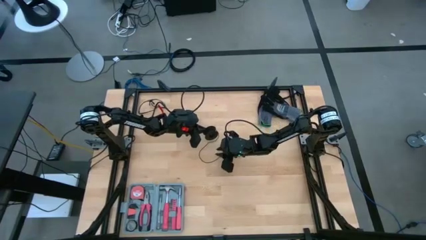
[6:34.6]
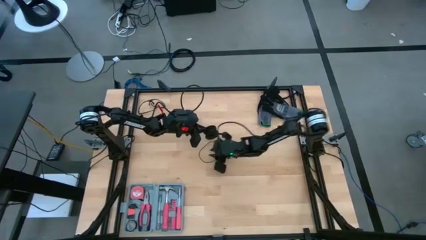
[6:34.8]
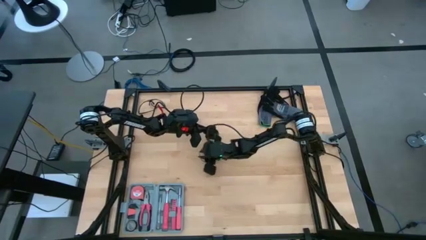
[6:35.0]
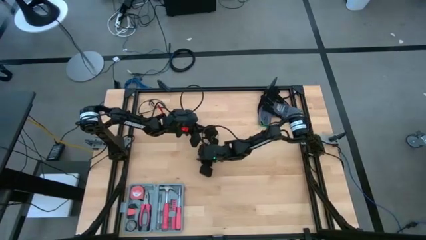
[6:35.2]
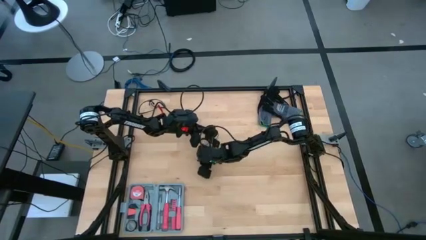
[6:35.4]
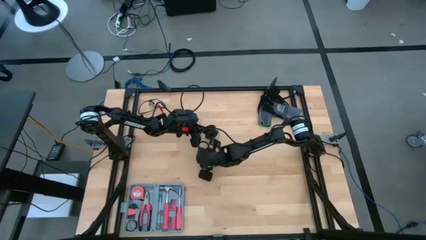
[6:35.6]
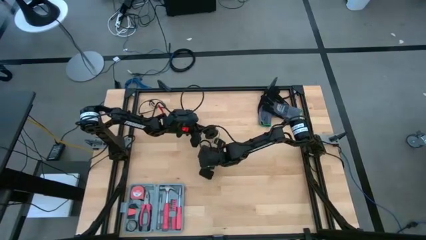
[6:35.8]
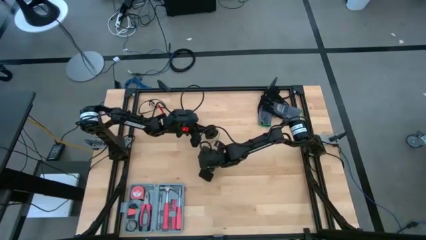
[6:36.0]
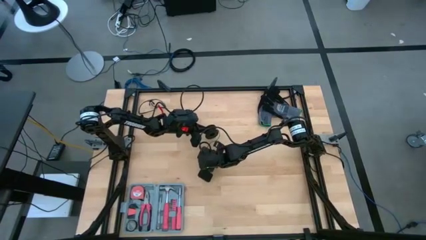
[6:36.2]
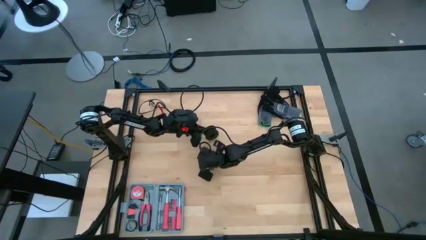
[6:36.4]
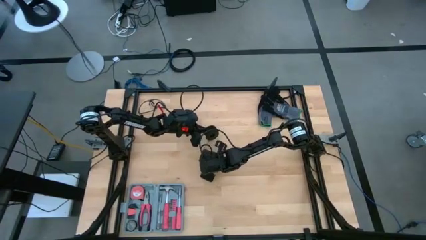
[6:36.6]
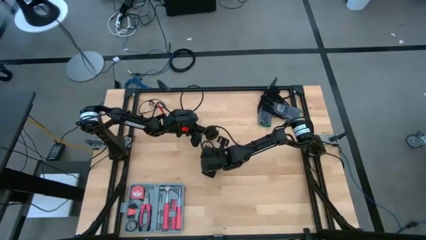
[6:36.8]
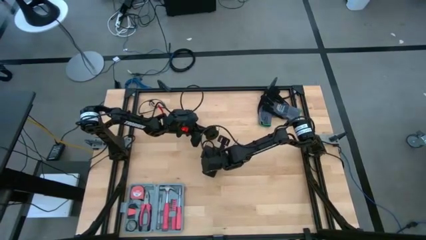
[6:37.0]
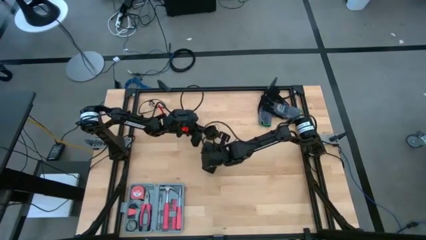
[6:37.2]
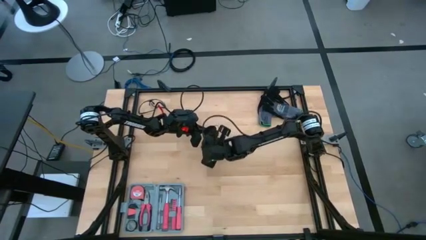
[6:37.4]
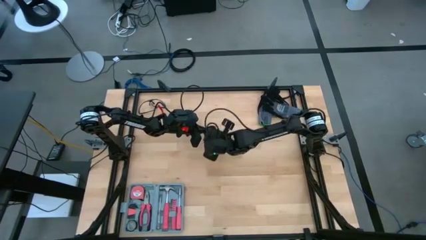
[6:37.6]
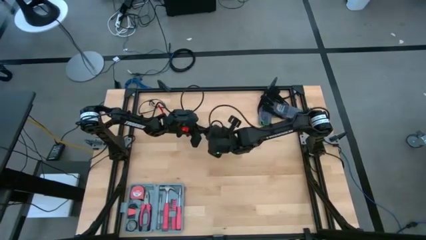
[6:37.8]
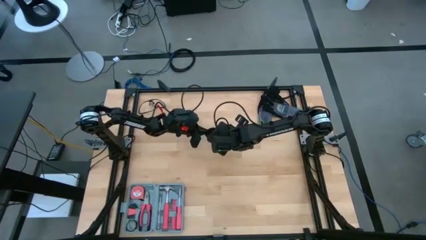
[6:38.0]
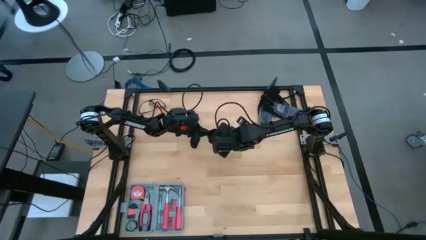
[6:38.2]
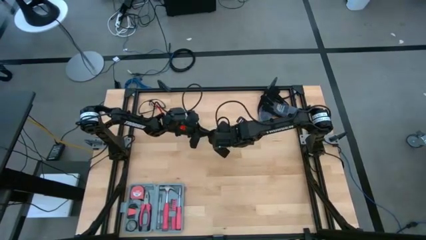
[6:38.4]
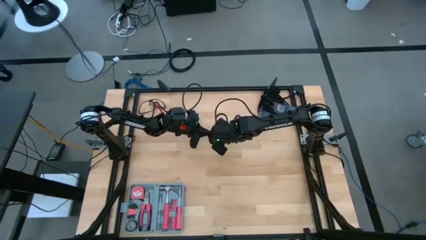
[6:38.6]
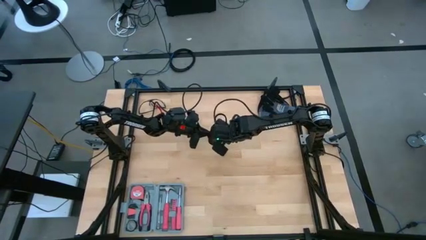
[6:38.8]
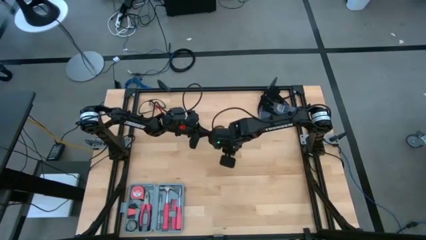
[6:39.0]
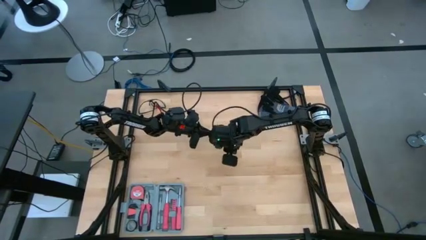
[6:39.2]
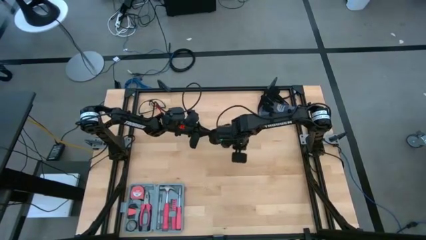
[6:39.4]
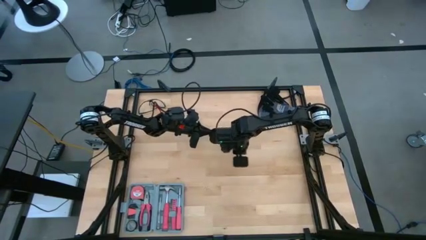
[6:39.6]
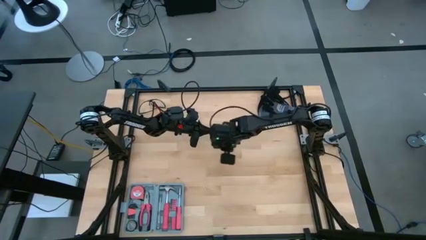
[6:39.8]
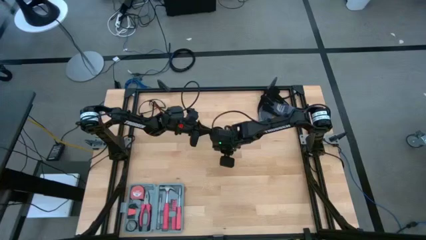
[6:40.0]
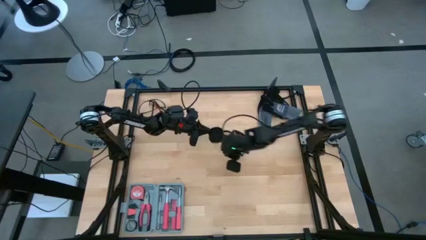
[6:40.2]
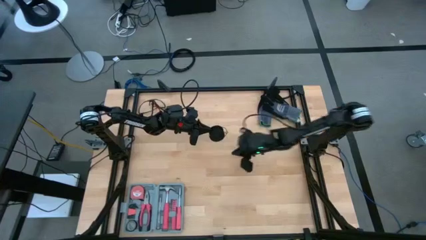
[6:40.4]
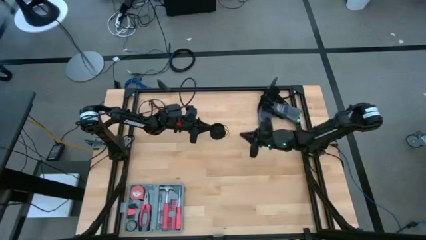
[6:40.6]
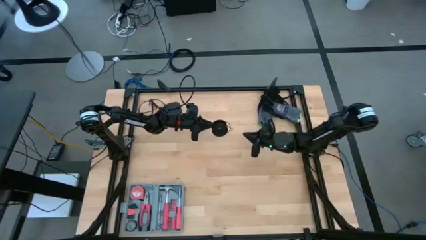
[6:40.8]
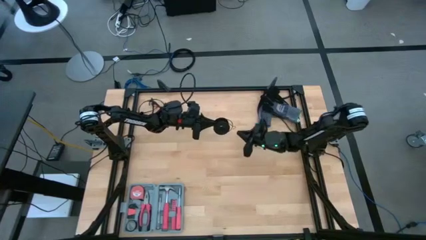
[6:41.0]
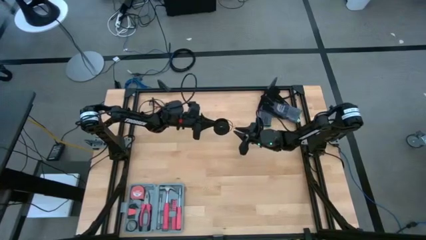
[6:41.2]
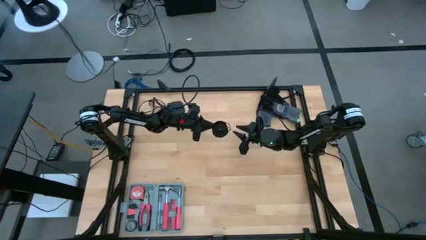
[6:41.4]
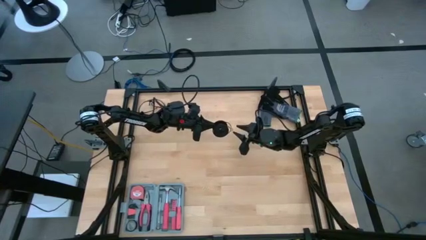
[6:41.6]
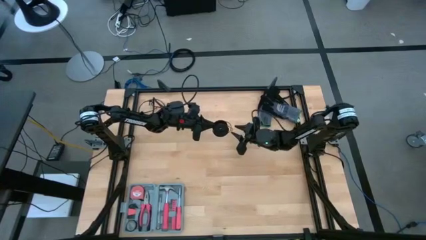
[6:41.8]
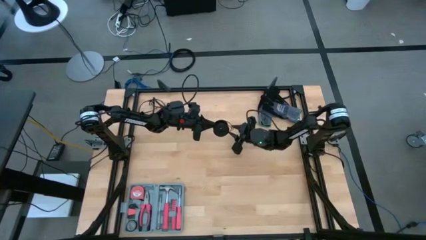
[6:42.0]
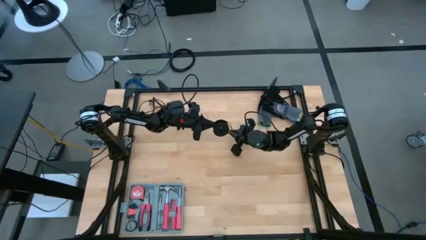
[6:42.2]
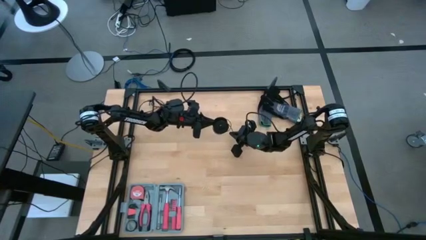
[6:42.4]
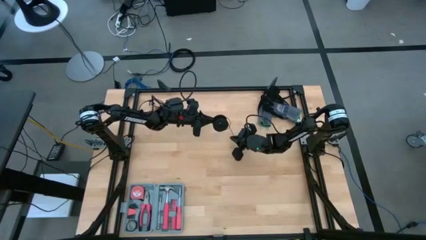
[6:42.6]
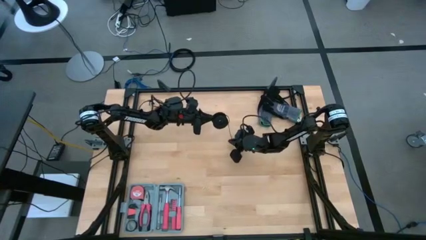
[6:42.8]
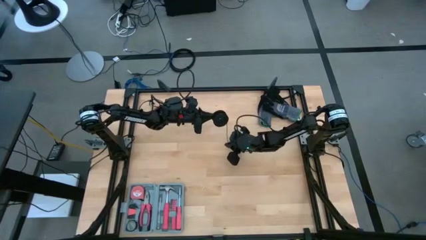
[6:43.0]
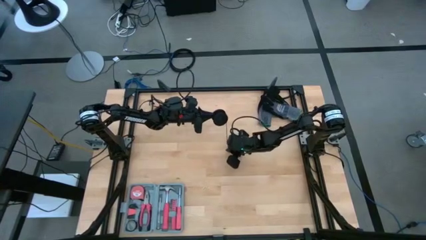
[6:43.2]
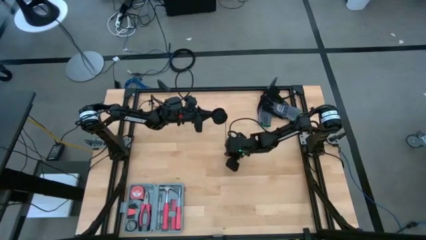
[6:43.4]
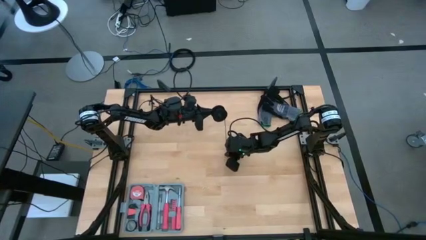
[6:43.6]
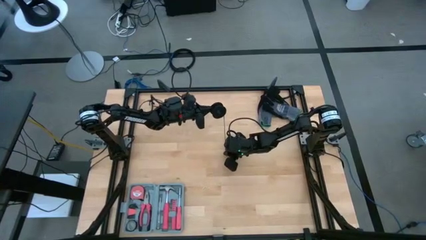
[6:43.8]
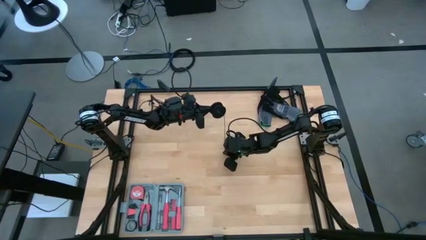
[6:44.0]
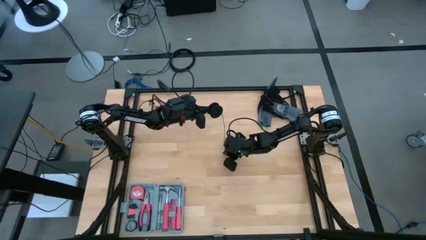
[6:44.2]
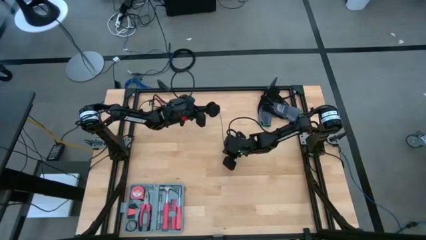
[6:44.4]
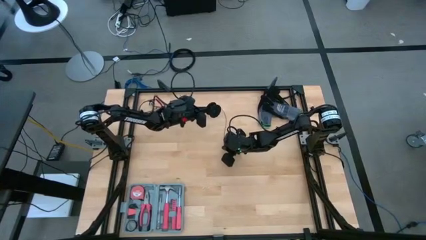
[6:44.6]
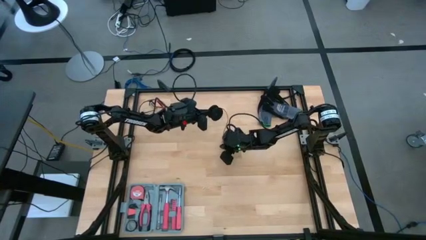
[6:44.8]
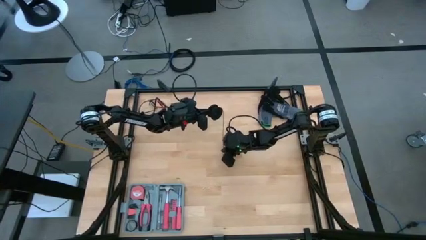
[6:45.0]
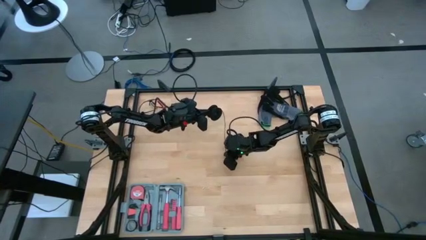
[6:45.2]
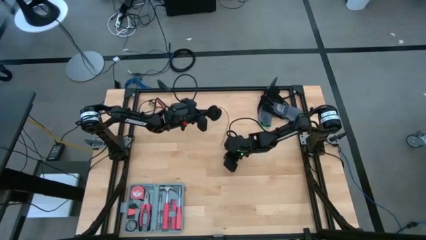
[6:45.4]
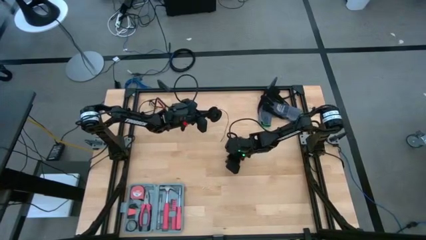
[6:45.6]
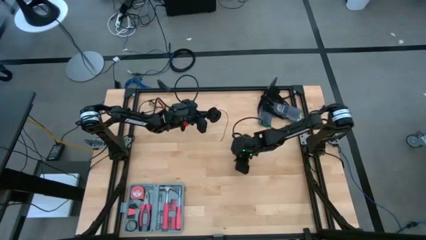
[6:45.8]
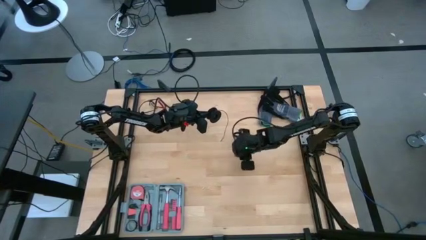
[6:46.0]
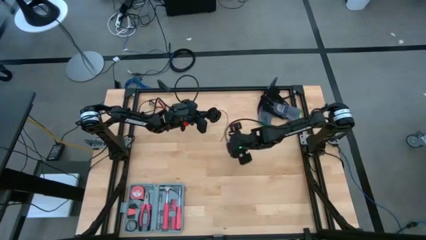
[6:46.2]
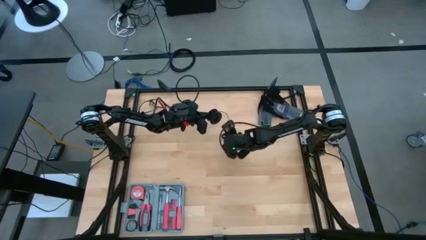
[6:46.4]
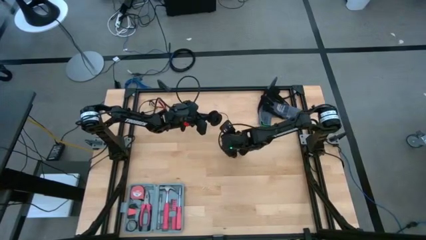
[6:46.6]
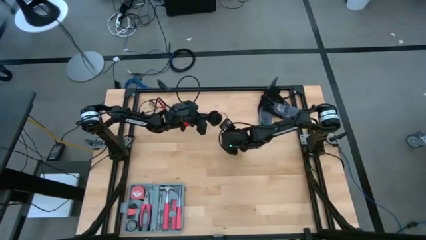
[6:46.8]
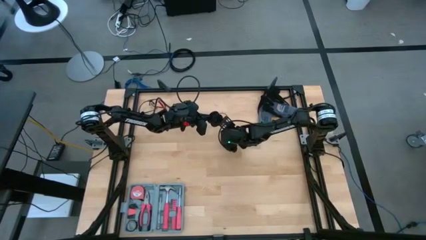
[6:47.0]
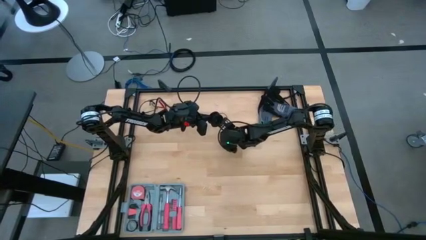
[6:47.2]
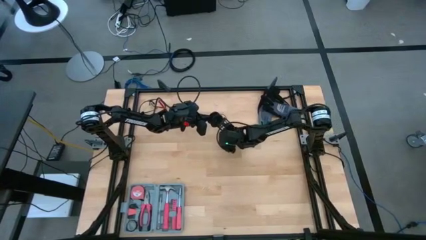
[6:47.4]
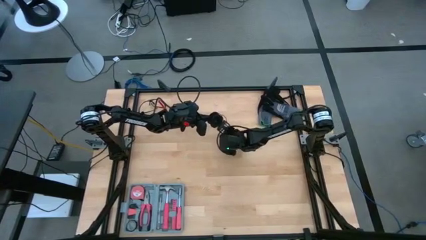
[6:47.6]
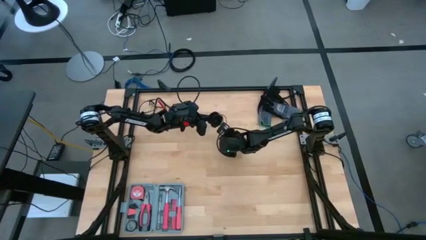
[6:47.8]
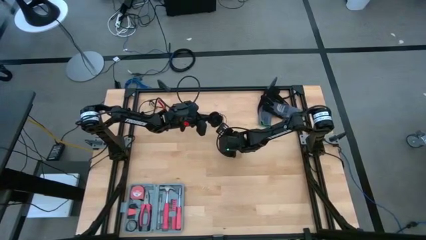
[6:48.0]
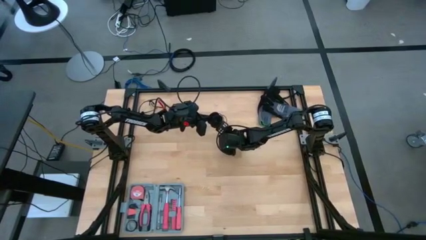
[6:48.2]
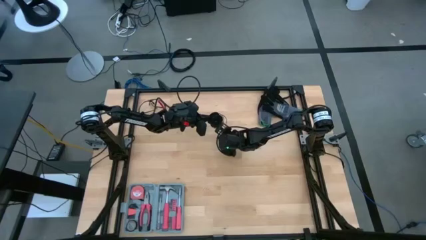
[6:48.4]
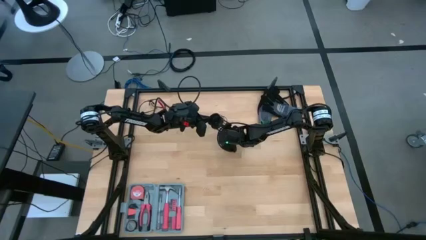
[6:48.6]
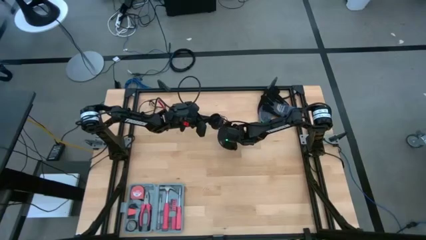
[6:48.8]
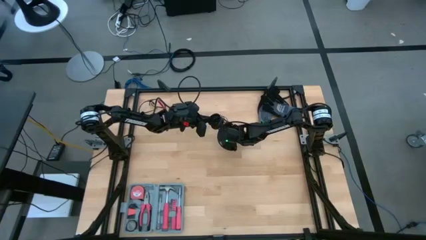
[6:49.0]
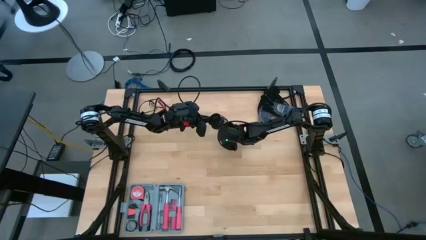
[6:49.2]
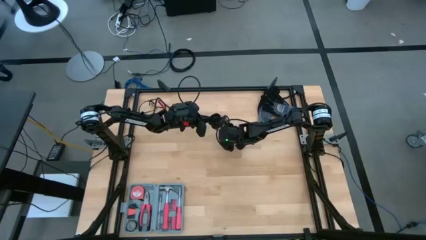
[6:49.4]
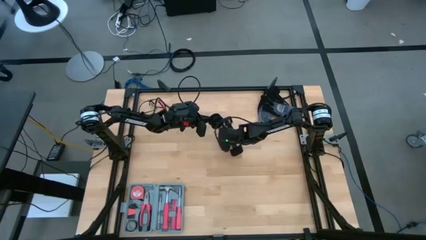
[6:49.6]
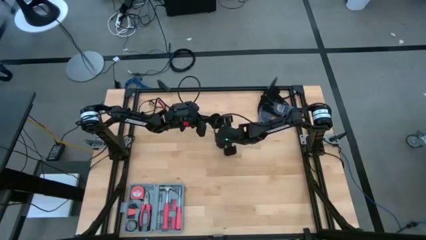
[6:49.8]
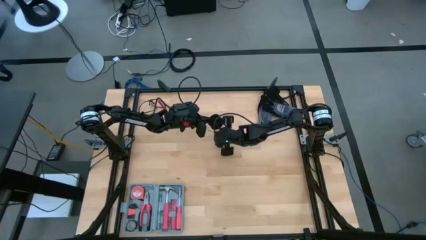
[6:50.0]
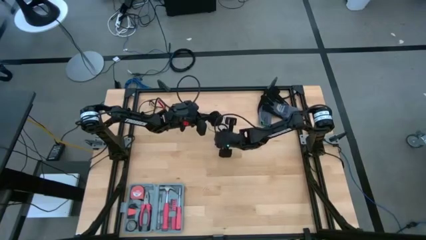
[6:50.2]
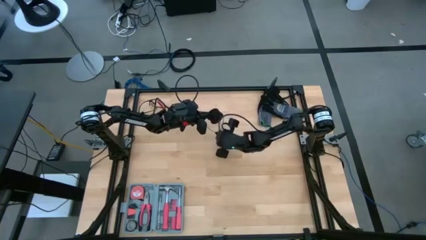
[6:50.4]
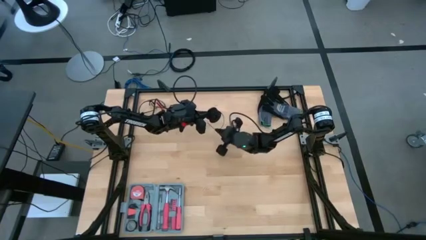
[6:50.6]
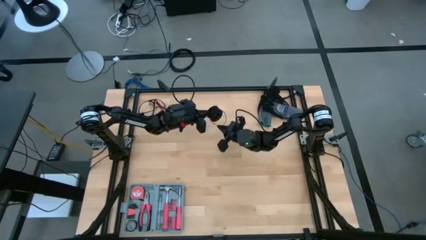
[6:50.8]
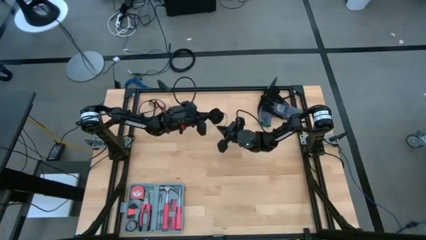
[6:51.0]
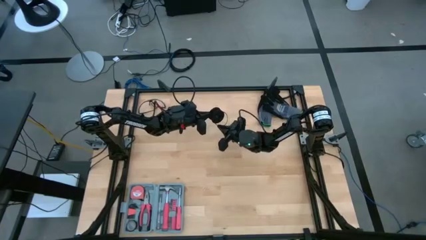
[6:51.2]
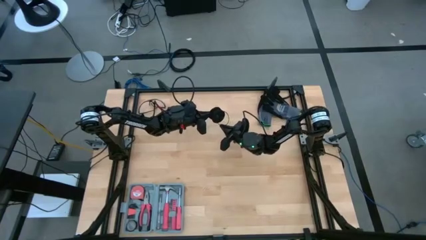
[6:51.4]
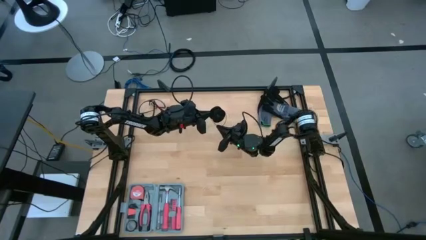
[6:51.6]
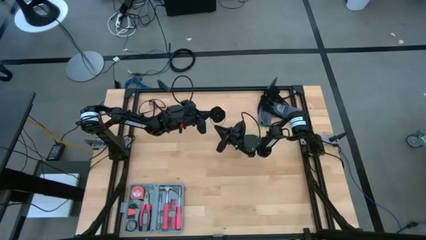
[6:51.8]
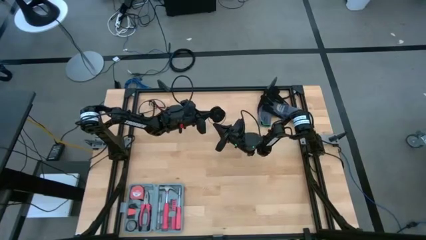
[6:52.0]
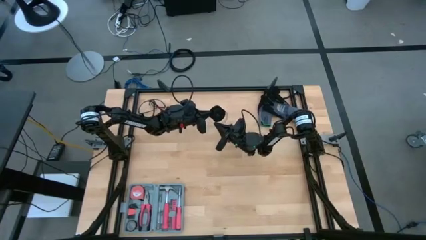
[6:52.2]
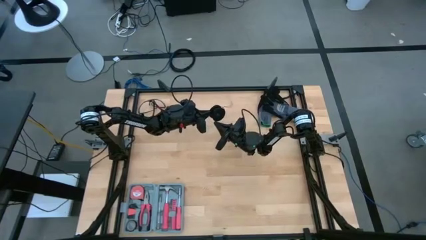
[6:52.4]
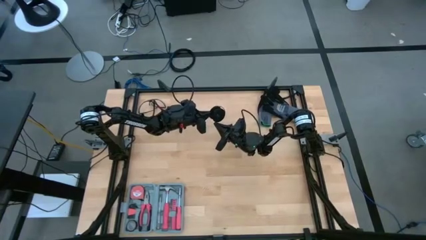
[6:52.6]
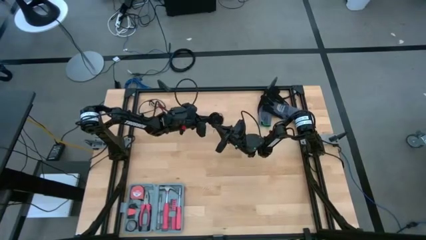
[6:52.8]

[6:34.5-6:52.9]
Task: Coil cords
Coil the black wire onto the black spool
